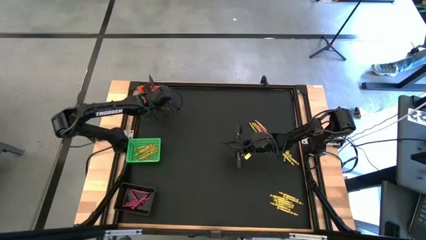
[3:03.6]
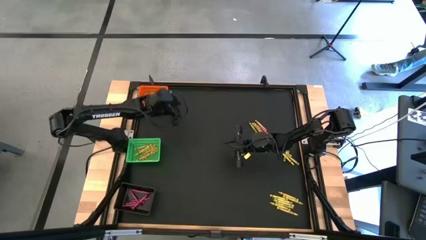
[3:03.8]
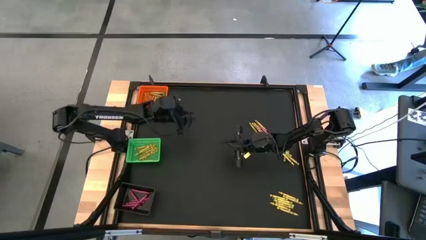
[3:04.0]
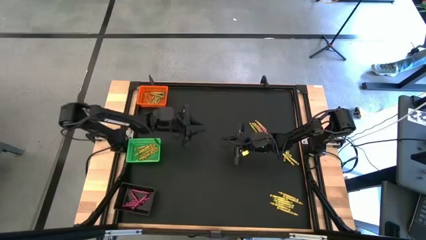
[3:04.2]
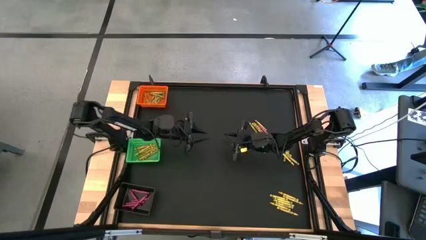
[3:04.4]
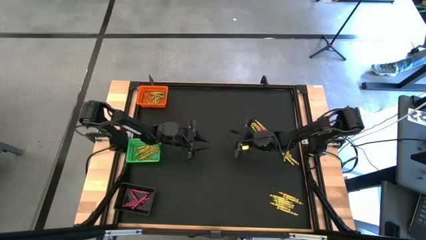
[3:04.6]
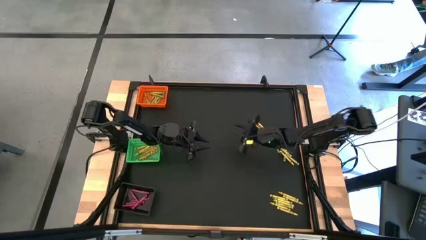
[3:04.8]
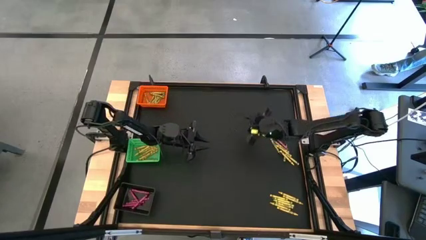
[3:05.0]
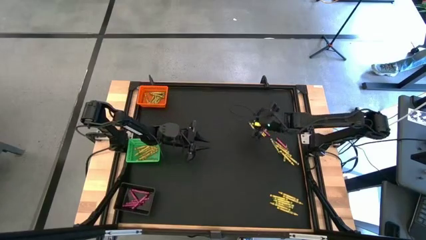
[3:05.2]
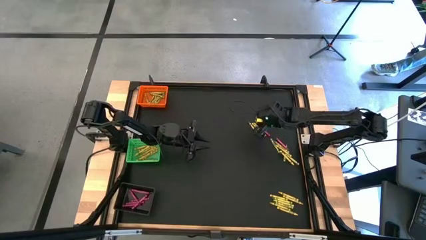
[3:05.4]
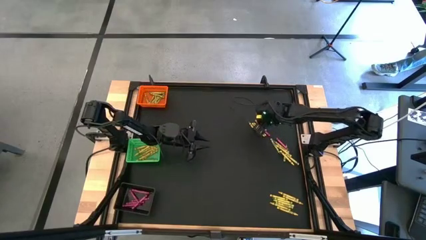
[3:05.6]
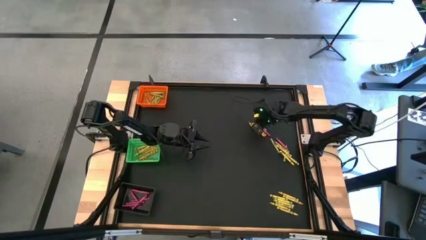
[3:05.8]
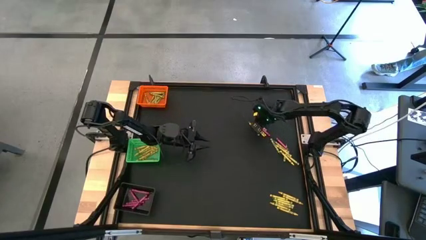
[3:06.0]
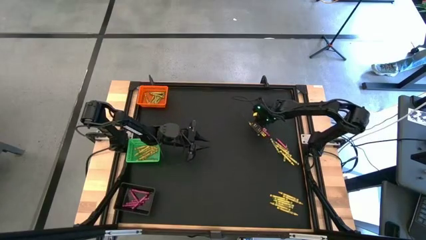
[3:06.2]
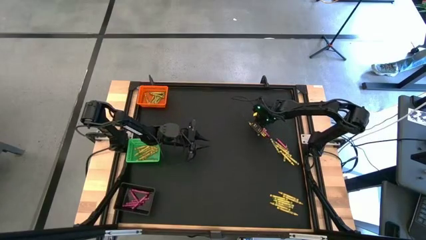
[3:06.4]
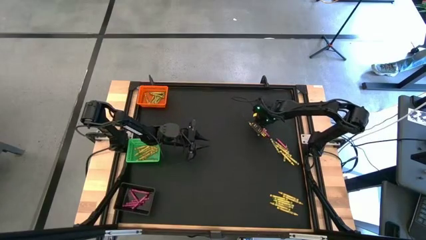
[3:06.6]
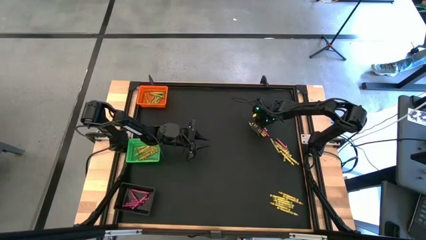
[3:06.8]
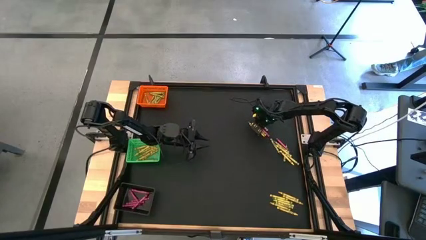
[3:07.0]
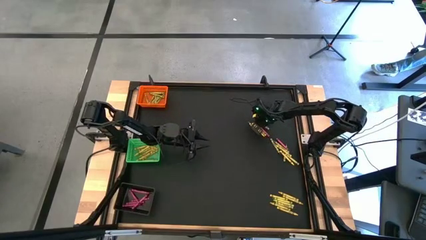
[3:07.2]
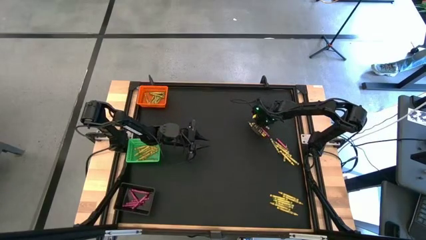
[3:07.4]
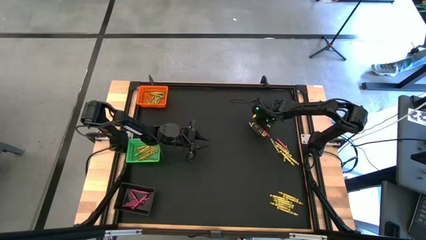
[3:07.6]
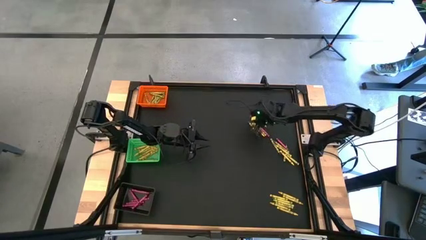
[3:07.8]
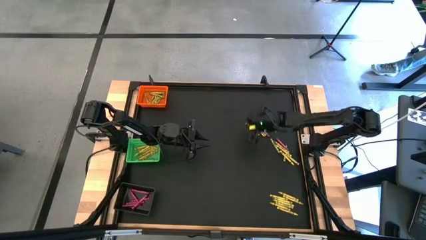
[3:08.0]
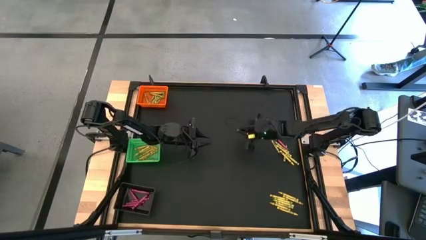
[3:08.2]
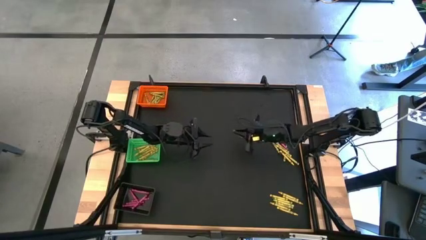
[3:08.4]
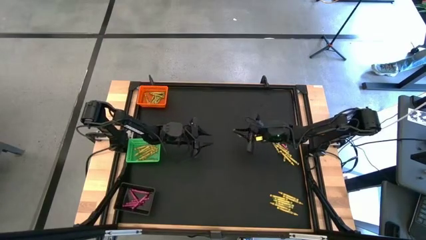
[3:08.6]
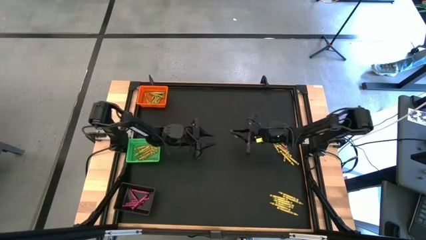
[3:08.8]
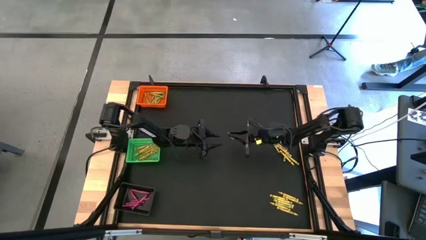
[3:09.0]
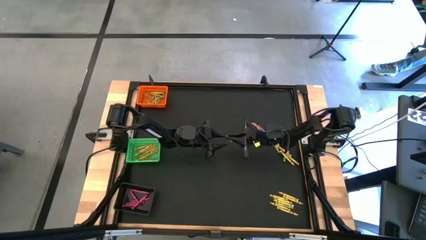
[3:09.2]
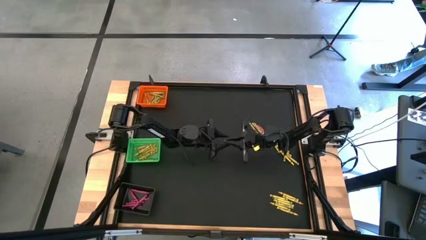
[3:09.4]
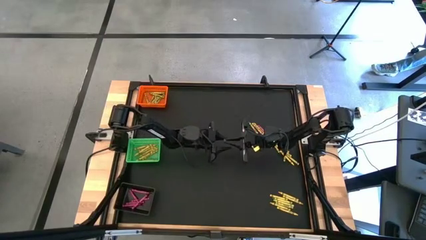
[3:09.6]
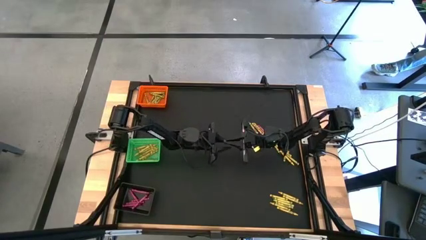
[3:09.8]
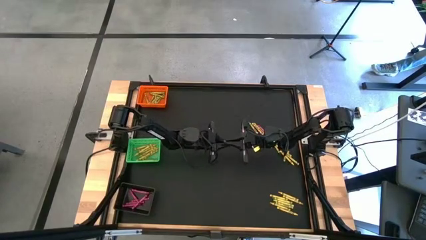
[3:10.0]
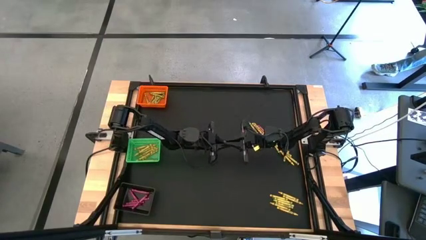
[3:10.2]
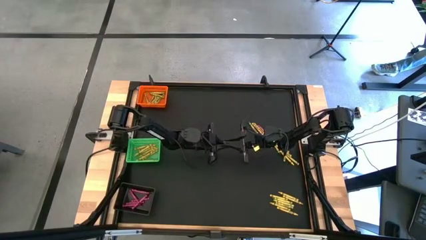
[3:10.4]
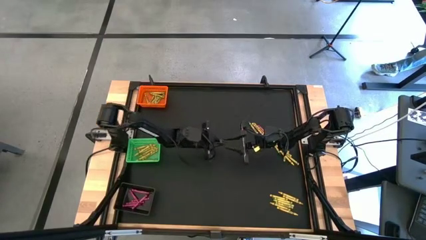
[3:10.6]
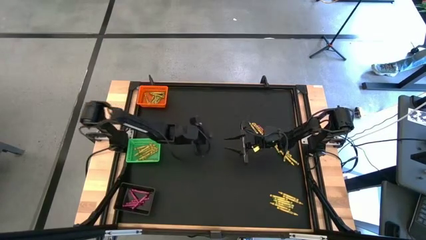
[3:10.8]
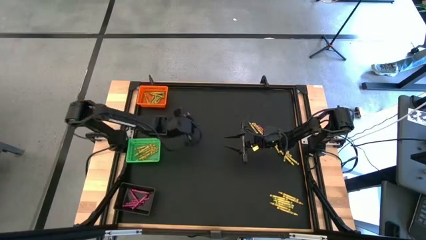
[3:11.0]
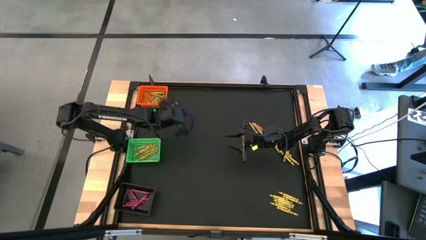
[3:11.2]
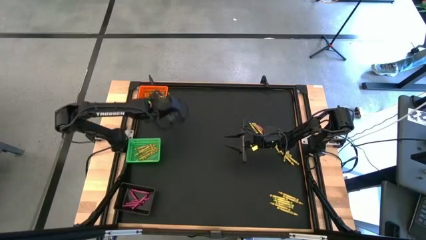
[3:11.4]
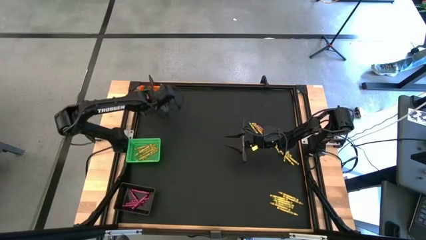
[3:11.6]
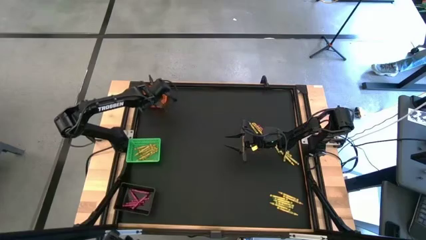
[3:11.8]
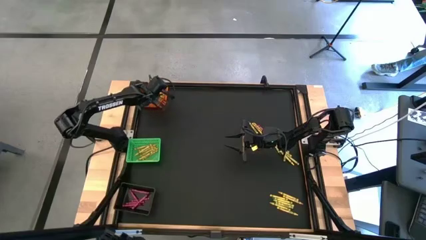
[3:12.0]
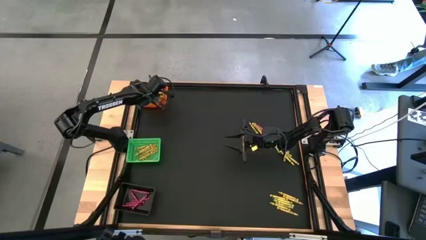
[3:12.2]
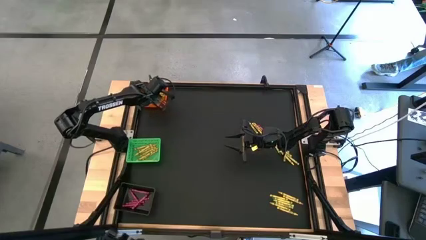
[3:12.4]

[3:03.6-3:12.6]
Task: Sort crayons
Put the green crayon into the orange bin

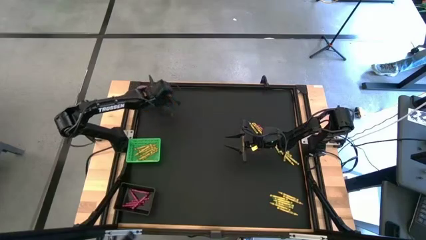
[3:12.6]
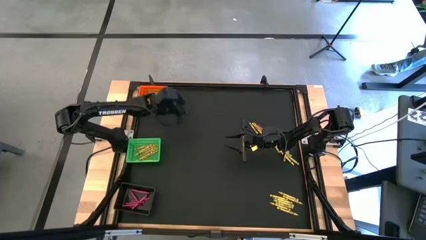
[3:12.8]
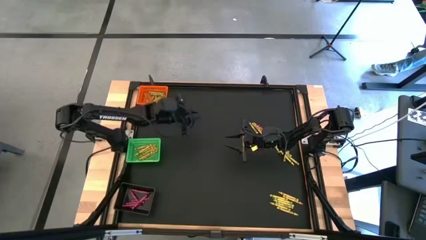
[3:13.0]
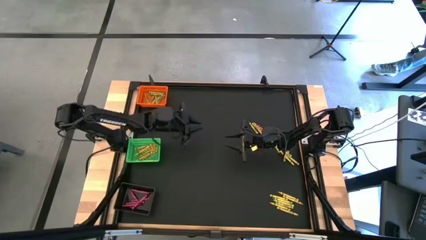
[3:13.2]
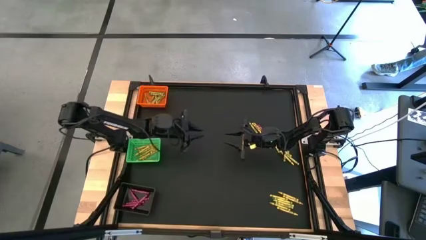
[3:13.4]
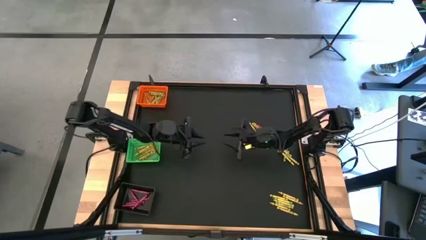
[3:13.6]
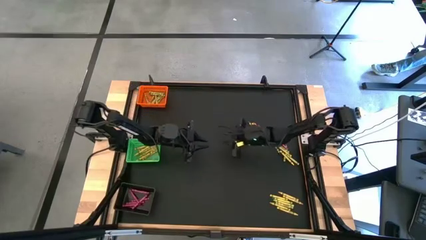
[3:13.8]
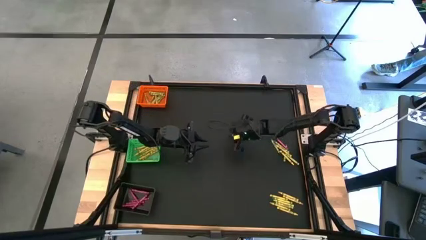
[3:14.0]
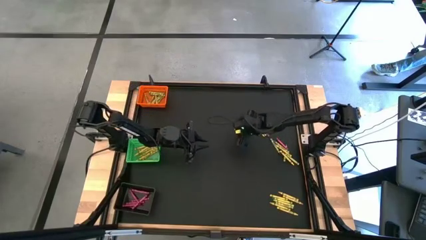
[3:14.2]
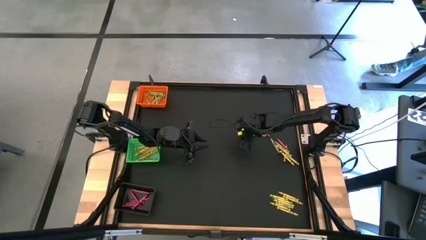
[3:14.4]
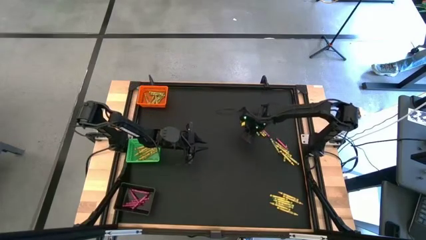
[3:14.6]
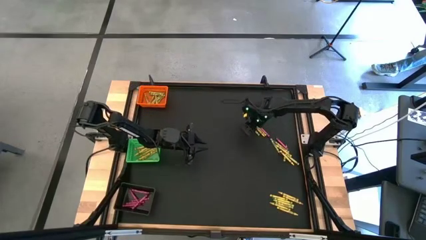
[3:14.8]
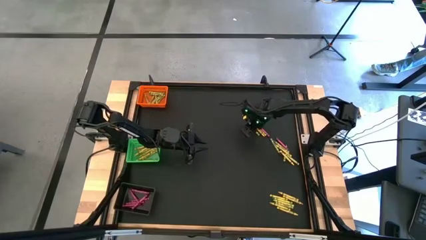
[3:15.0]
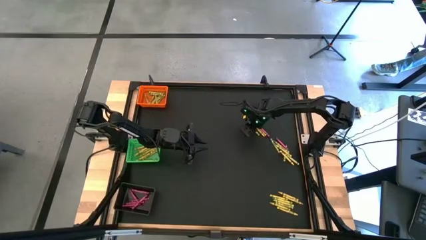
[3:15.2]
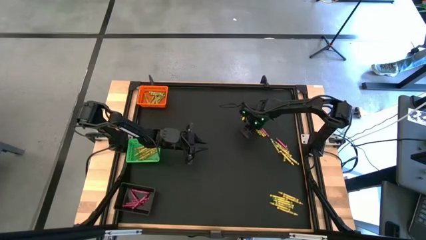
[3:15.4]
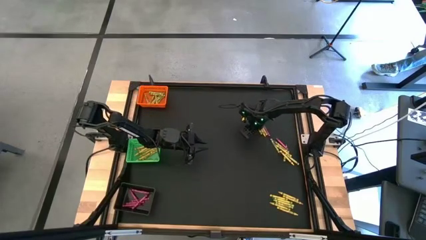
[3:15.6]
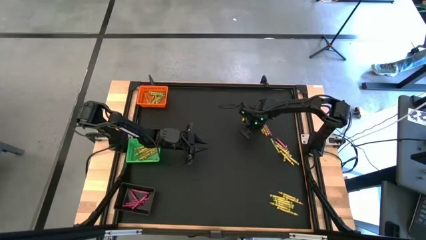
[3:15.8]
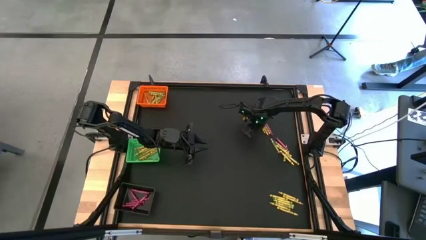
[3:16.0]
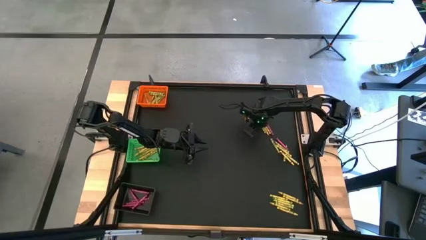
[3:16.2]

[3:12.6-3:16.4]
Put the green crayon into the orange bin

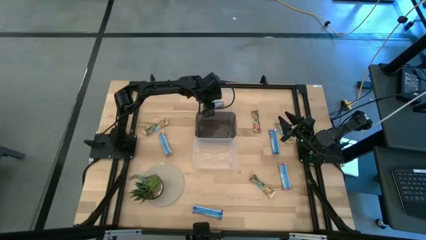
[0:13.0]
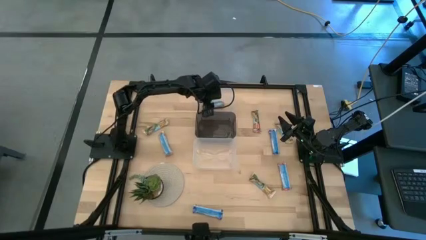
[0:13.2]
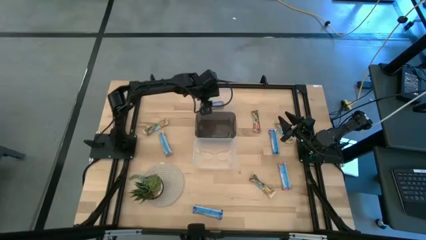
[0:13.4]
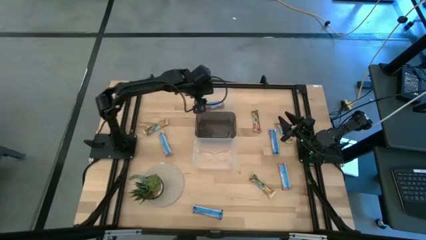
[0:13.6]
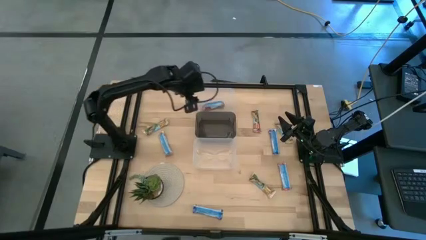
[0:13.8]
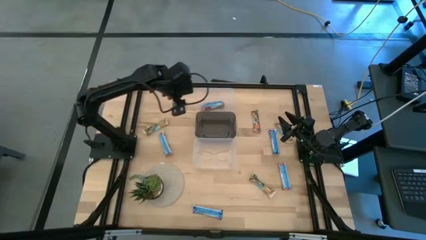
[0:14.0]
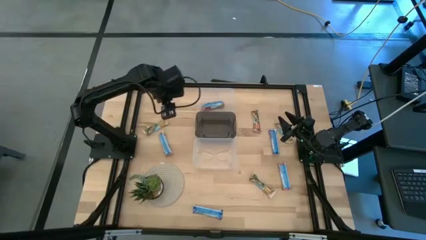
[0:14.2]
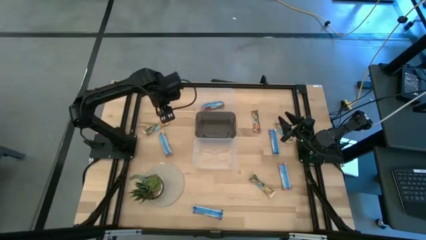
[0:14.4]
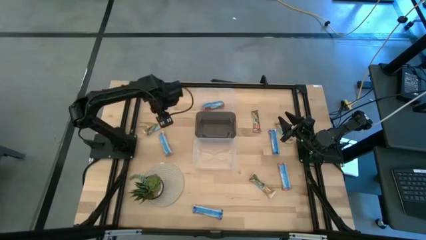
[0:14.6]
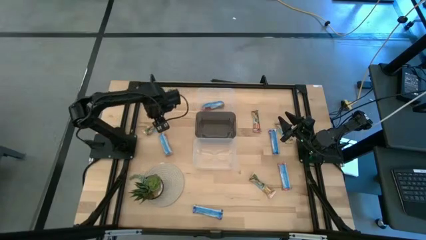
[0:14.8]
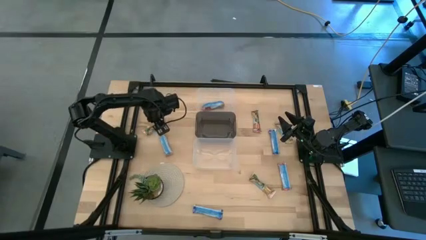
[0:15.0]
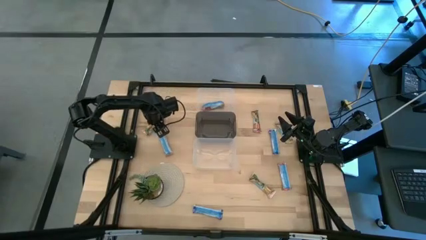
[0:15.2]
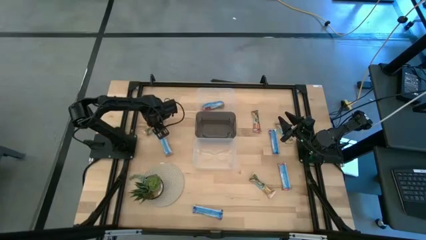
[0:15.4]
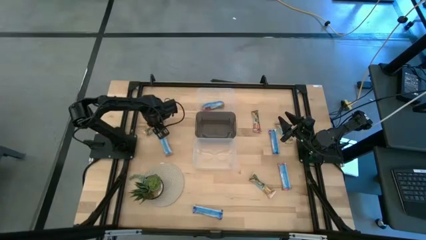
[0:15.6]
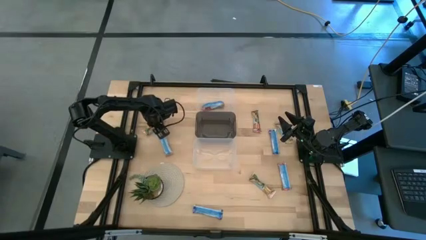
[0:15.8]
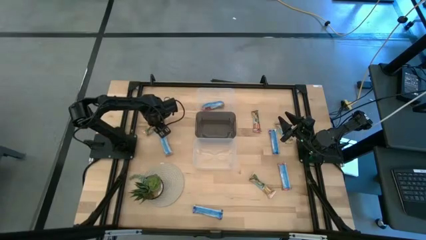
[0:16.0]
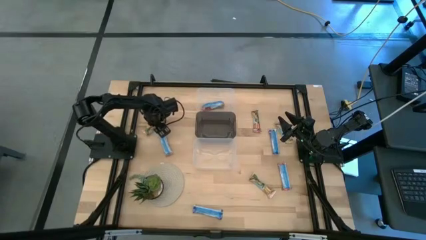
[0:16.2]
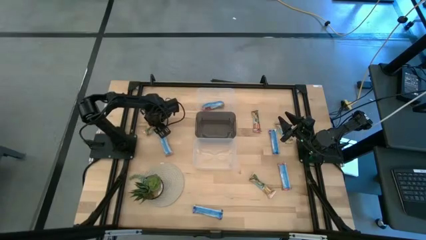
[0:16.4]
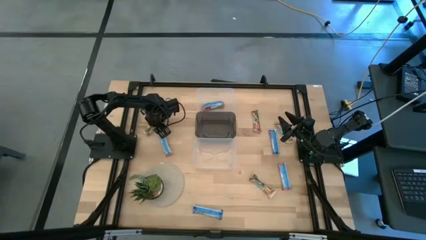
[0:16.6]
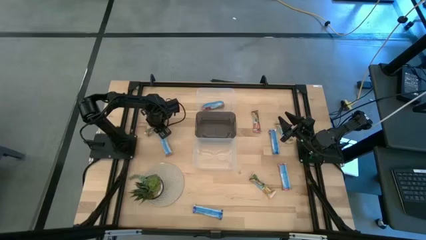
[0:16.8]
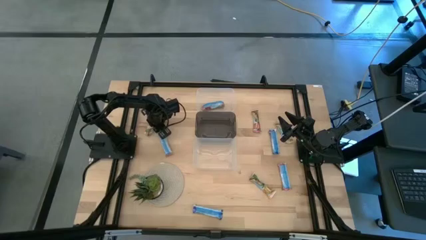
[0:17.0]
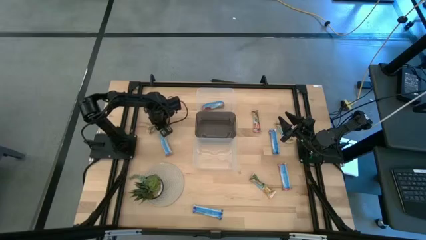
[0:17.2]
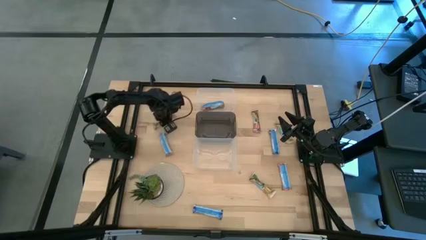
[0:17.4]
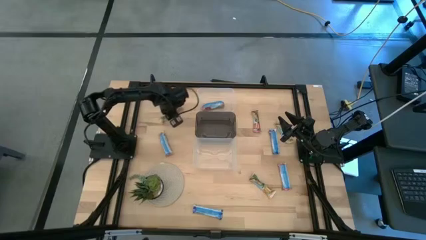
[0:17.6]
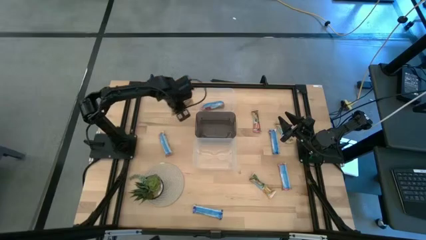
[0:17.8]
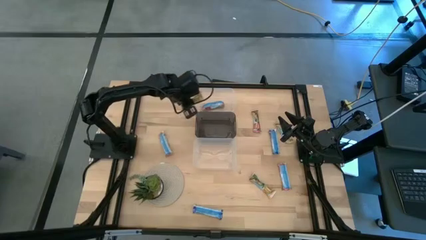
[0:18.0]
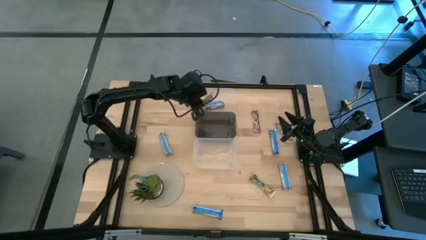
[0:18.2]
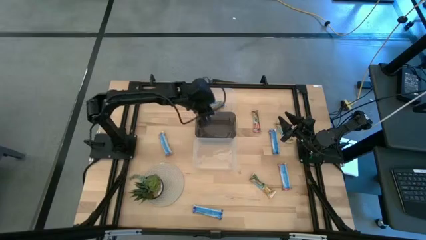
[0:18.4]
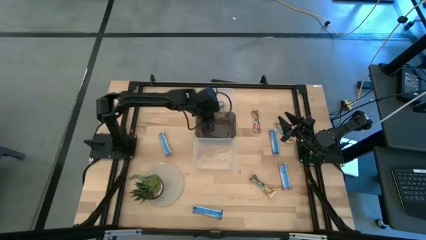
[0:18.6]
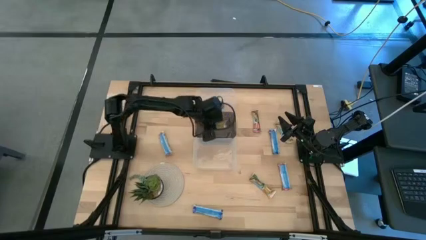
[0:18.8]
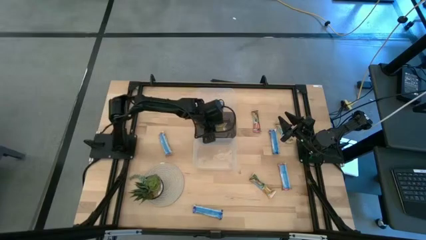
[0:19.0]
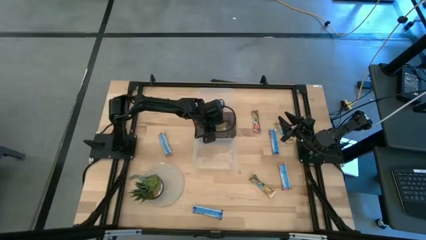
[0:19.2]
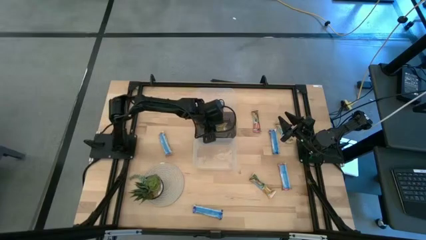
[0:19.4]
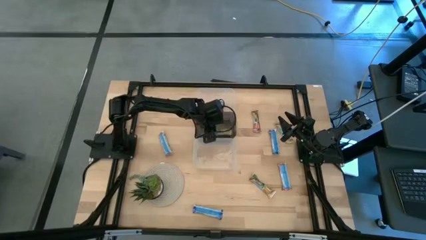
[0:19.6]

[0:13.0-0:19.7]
Task: Pick and place Granola Bars by type
Put the yellow granola bar into the black bin
